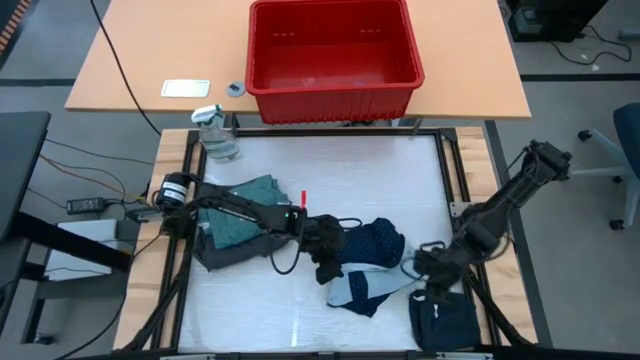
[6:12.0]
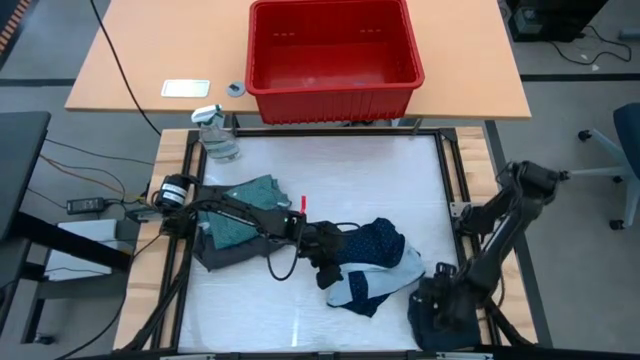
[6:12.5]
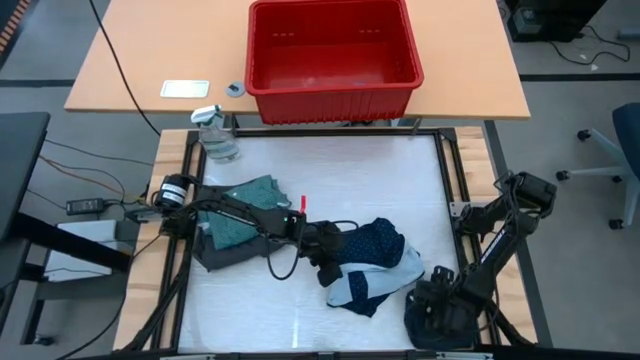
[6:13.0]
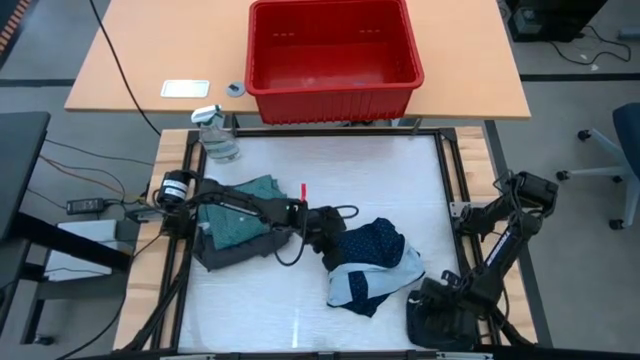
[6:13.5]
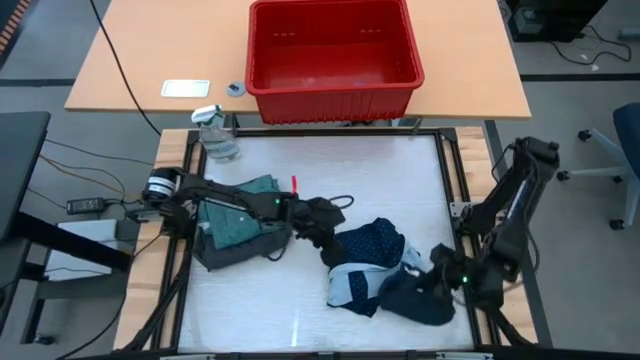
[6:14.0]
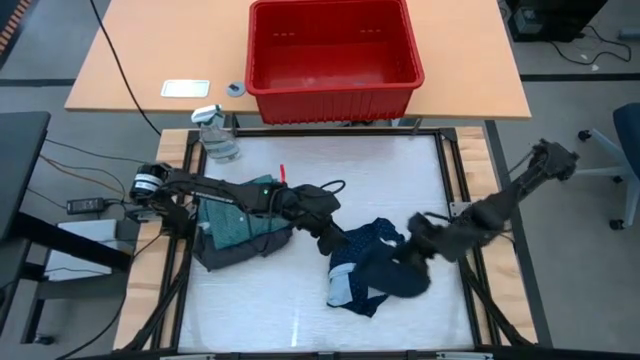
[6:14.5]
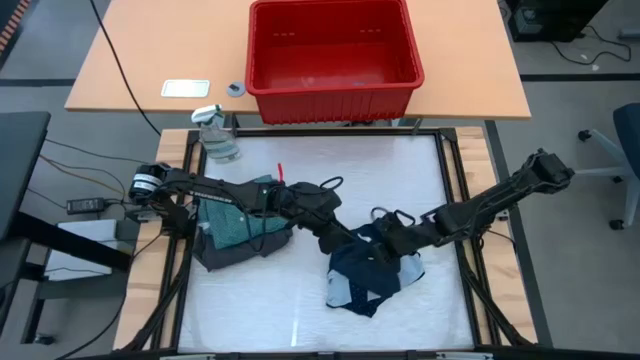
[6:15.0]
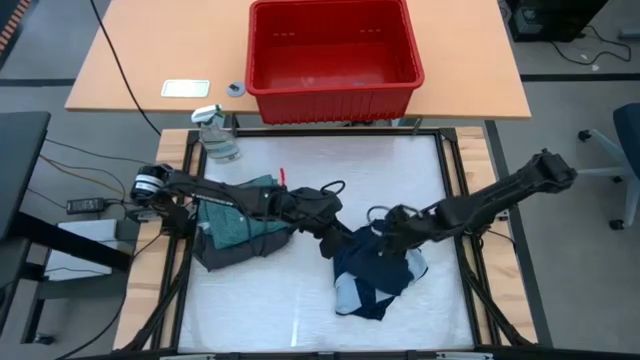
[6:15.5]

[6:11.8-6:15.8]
Task: Fold Laundry from Bin
Stack the dark blue short on top of the blue shirt on the table

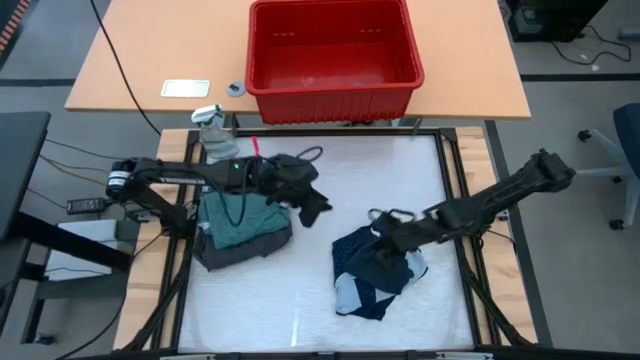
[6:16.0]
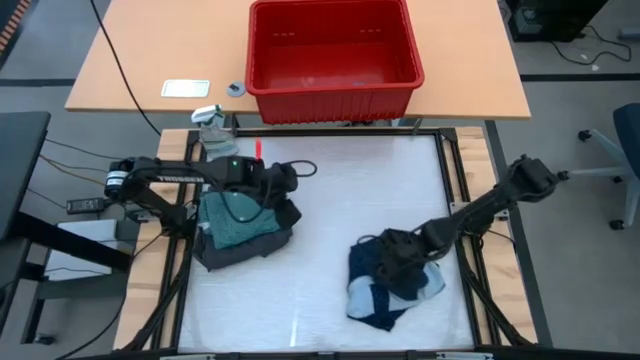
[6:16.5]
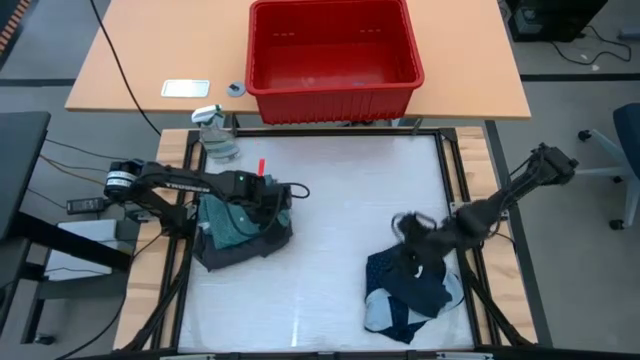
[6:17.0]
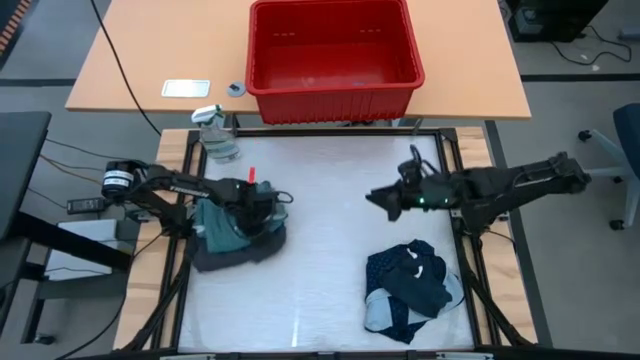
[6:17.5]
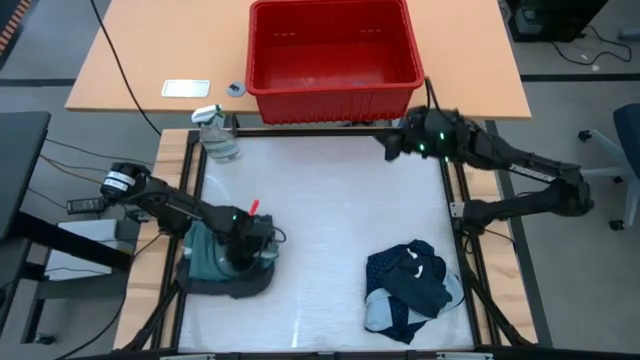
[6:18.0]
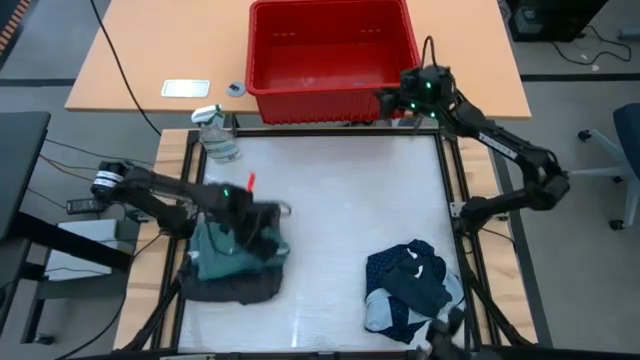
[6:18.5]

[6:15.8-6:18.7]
Adjust the stacked clothes on the table

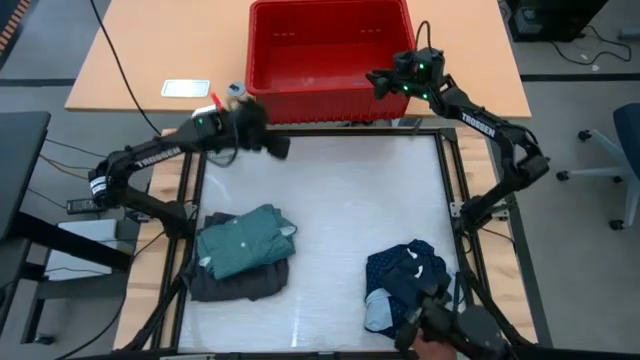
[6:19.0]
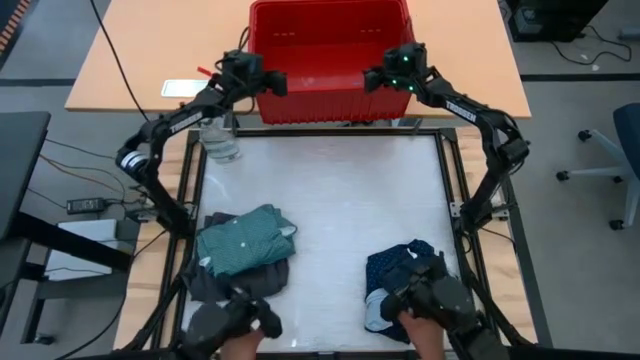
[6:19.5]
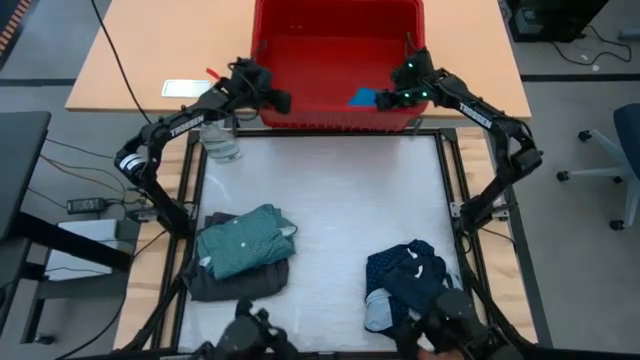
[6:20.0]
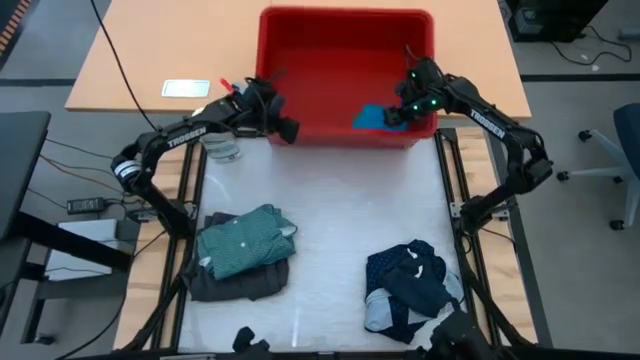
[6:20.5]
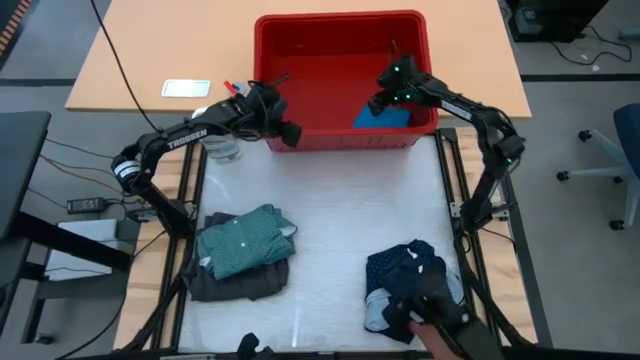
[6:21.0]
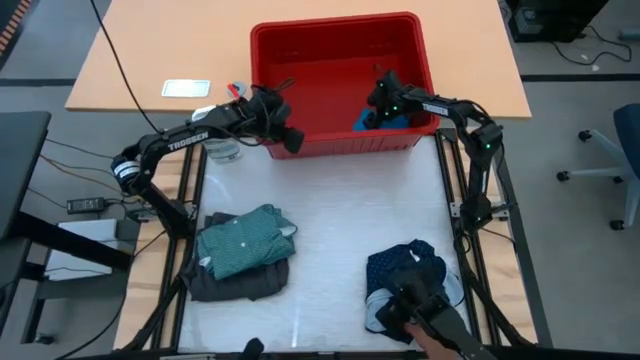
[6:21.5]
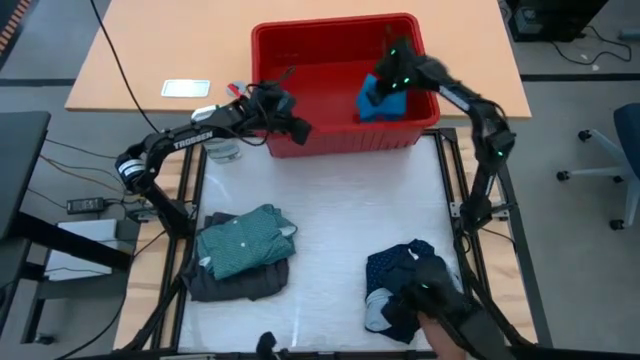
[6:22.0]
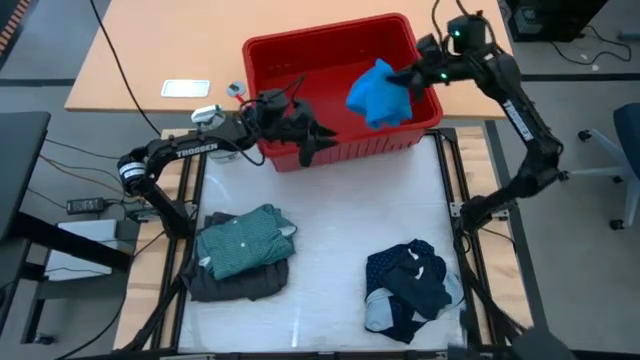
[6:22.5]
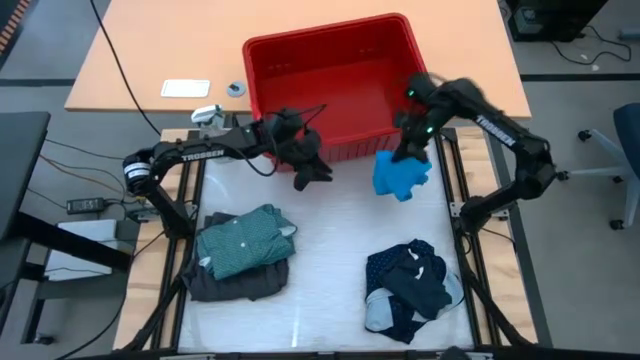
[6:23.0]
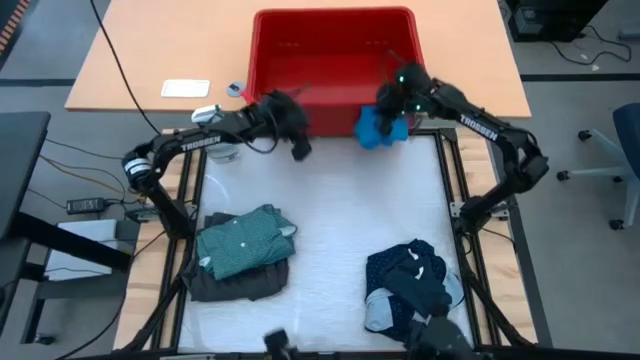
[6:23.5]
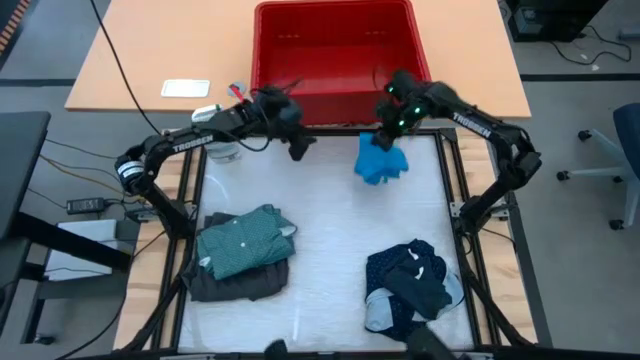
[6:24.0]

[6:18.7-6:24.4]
Put the blue short on the table

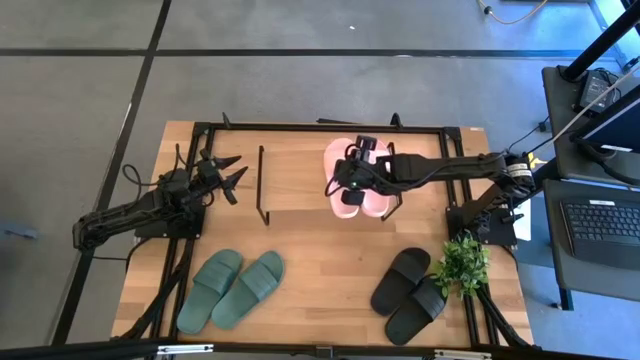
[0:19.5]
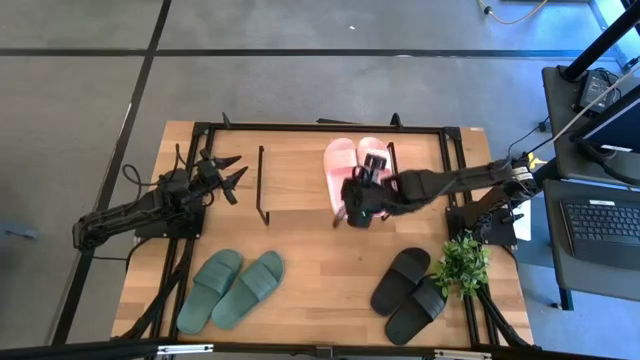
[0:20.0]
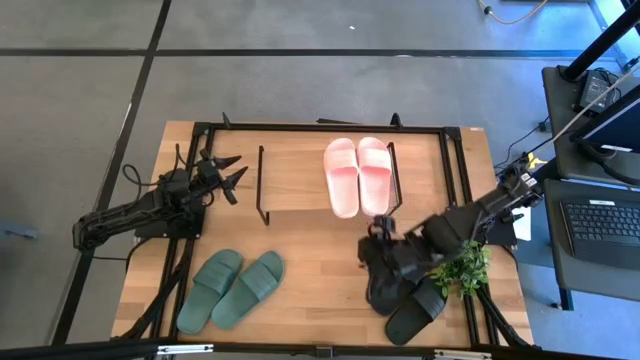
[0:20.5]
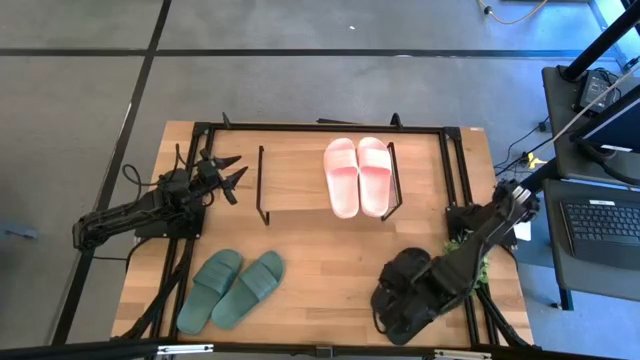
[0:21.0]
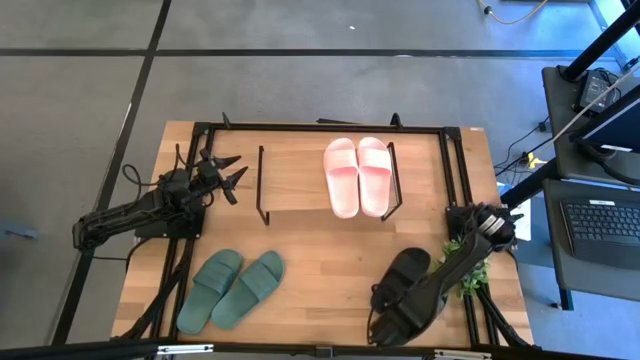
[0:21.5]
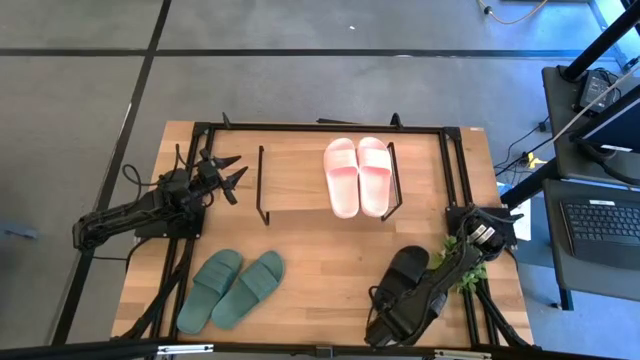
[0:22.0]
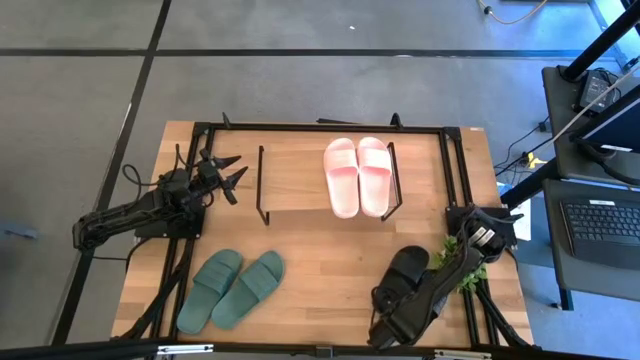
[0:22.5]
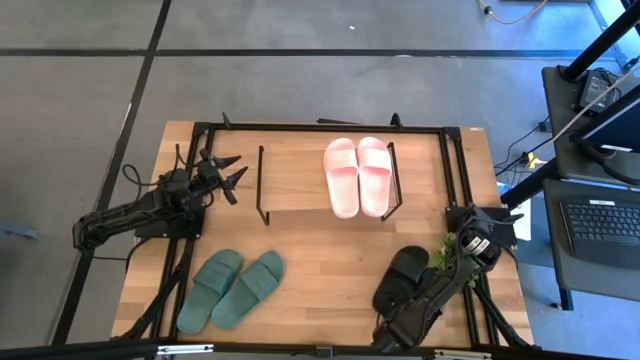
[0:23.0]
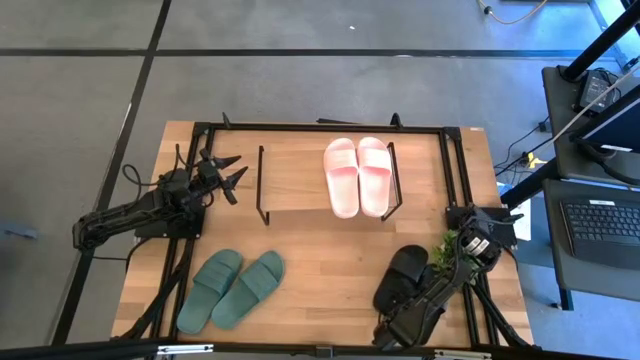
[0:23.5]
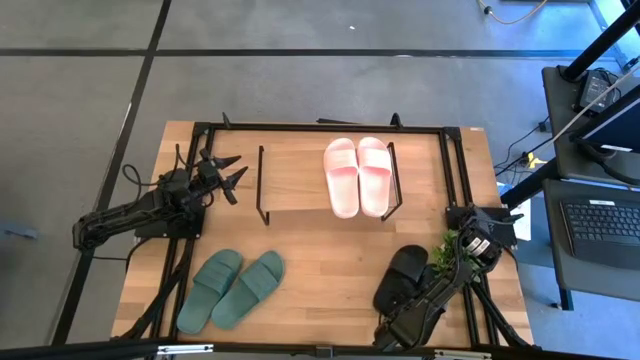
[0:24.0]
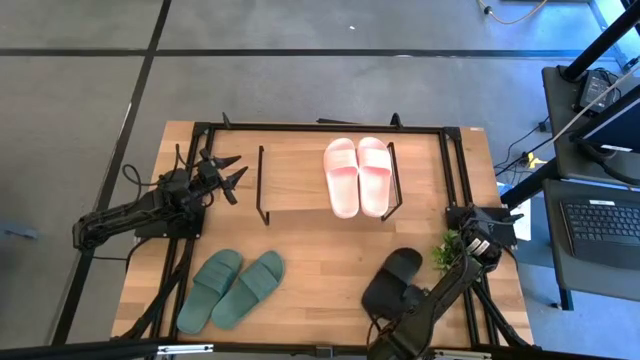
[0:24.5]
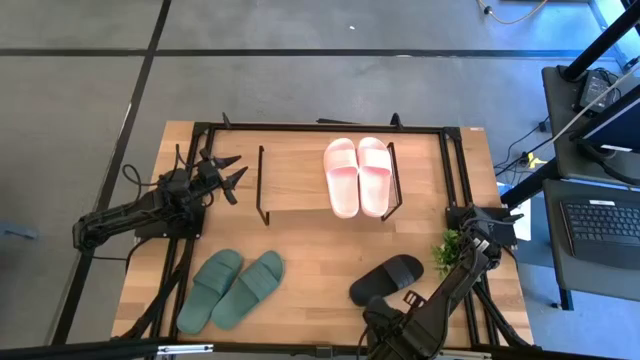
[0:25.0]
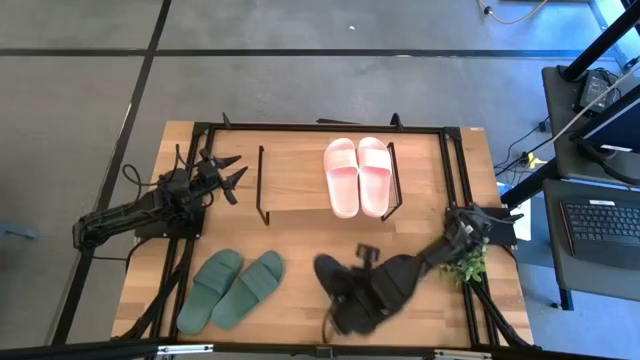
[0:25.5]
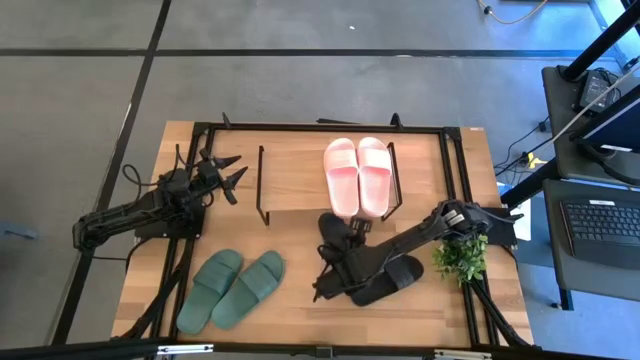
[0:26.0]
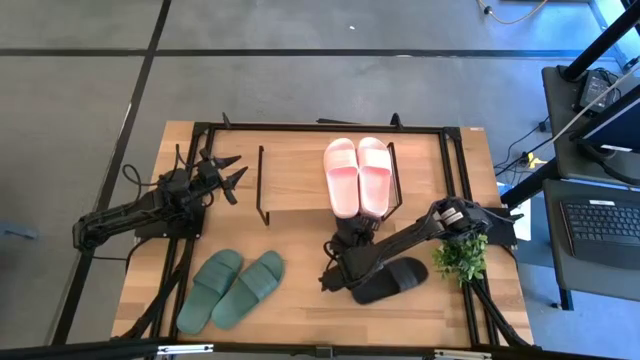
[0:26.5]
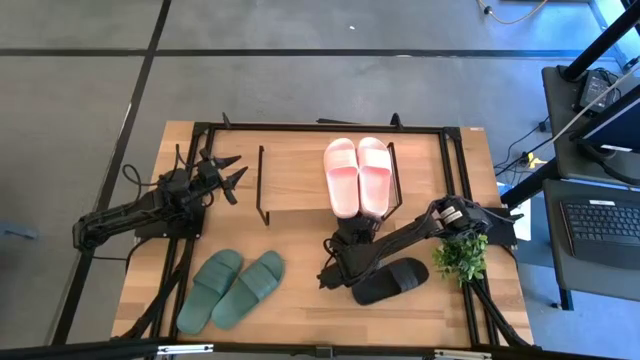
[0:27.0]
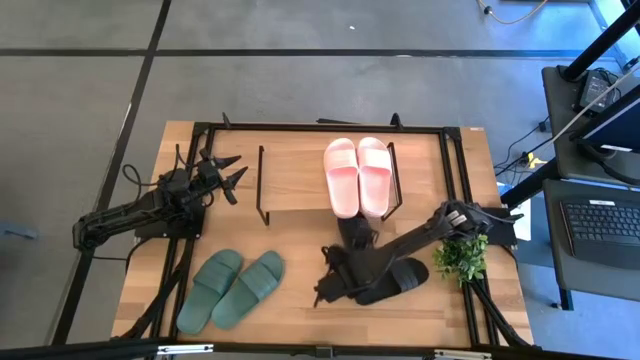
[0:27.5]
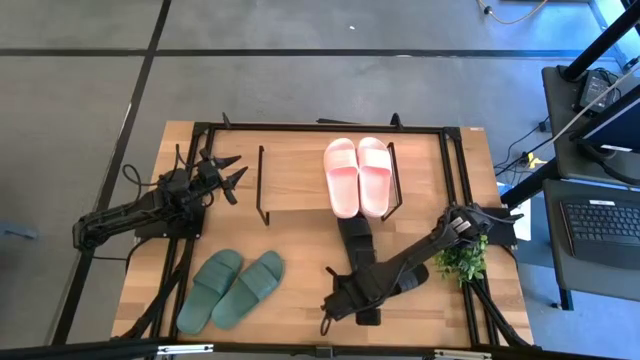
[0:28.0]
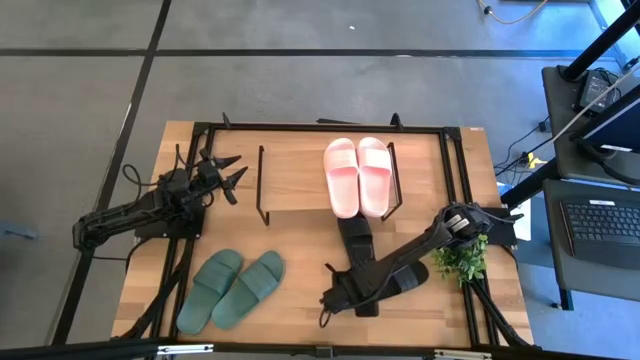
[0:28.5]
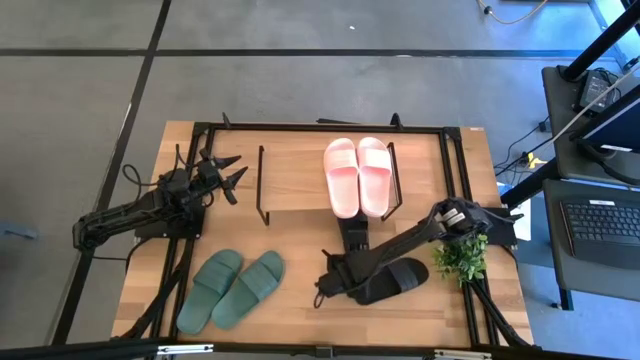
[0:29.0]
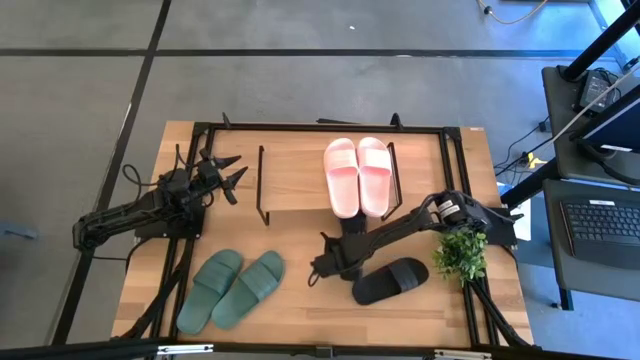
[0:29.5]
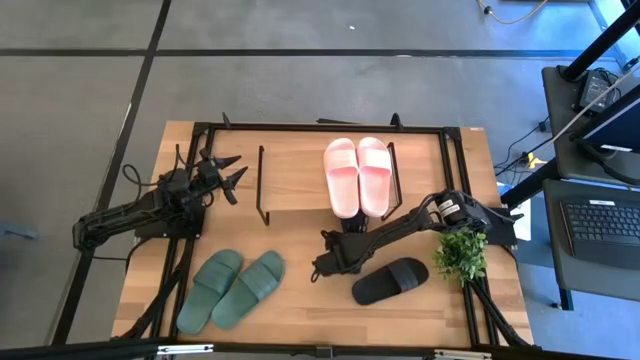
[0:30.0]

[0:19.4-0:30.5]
Task: Pick and place slides into the shelf
Put the right black slide under the shelf
